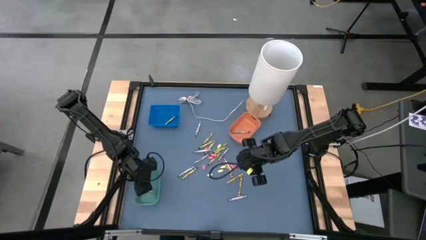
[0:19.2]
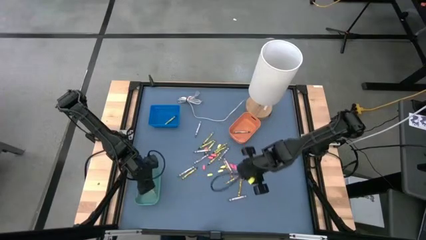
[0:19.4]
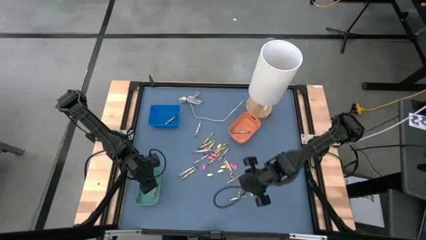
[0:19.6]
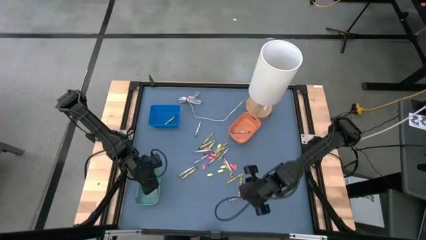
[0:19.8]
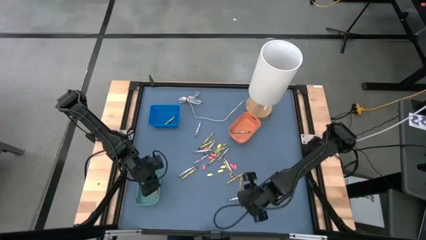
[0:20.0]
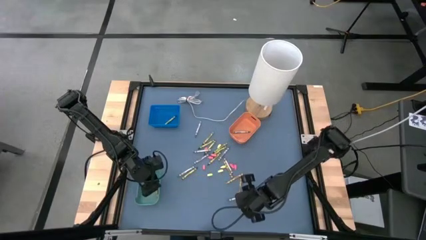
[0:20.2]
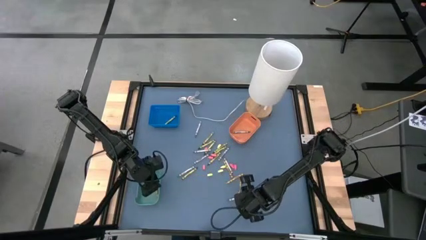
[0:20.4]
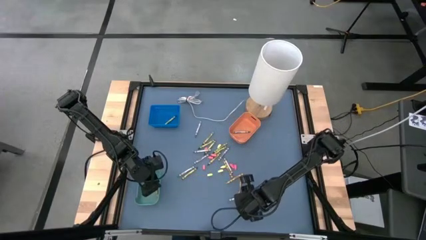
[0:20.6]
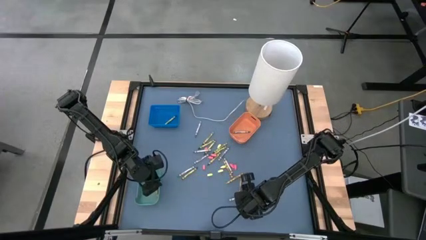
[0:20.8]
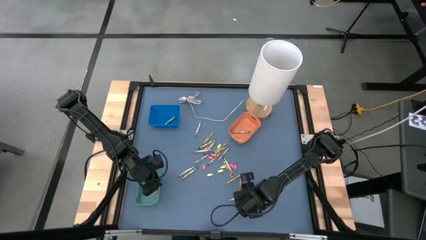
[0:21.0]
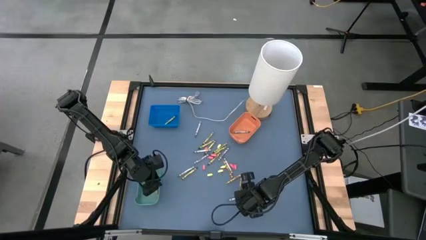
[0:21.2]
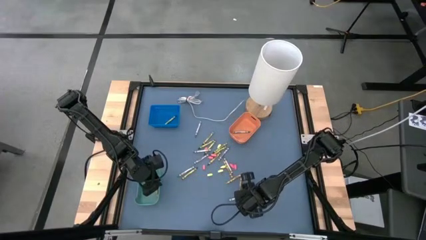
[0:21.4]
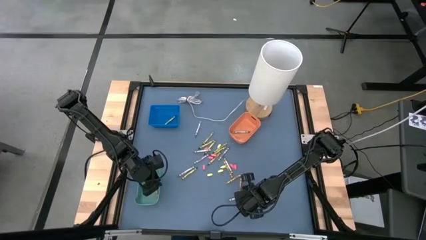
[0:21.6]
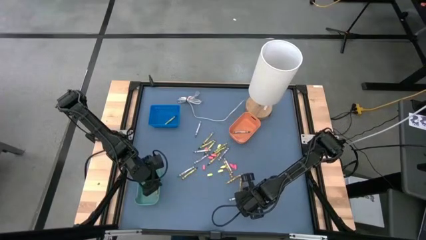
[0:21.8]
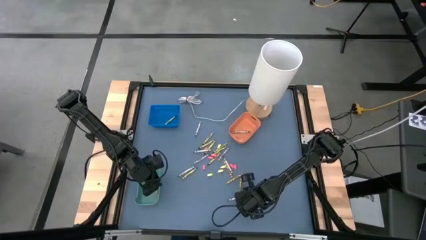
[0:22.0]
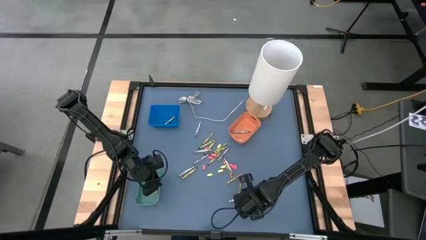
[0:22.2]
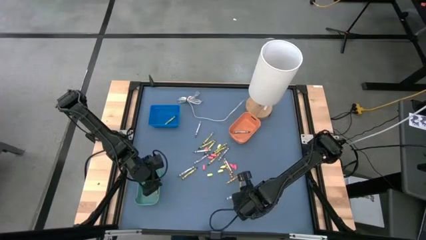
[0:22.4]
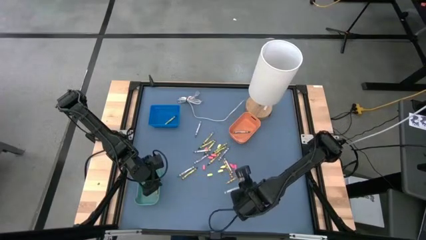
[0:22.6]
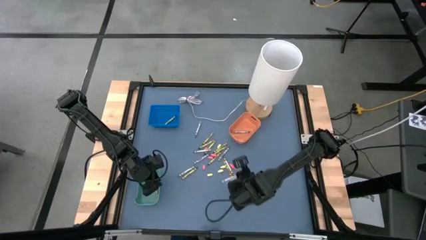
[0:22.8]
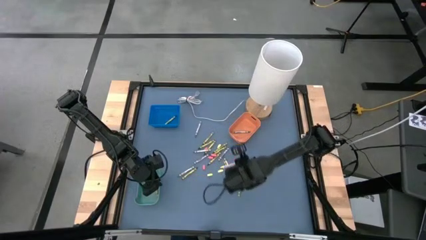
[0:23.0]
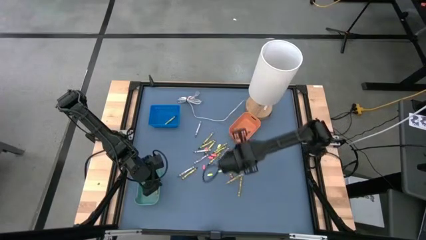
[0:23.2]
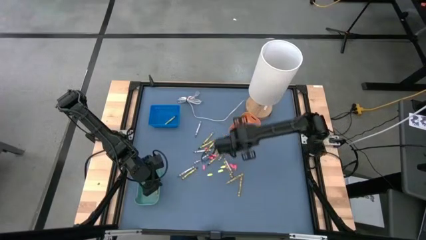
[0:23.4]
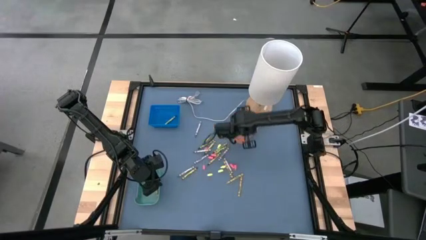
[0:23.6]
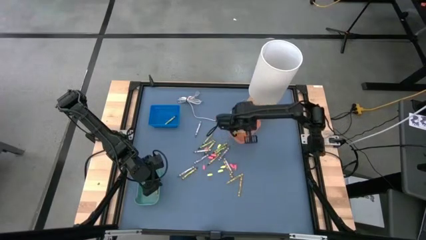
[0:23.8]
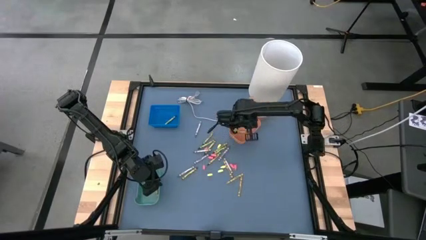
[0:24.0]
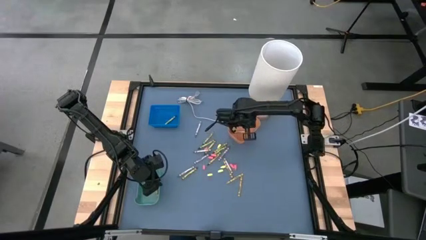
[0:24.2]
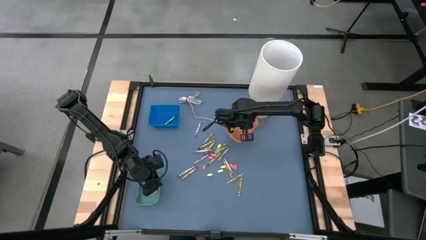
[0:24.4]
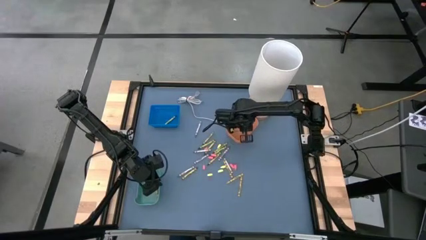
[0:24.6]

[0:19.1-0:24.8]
Task: Sort crayons
Put the gray crayon into the orange bin

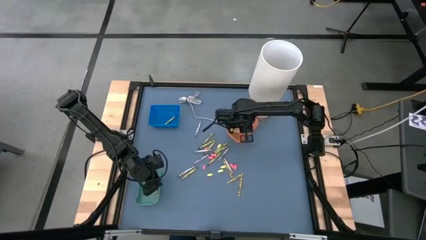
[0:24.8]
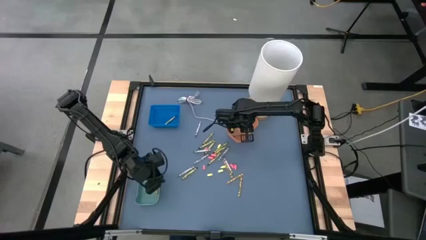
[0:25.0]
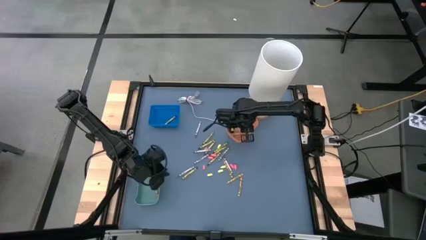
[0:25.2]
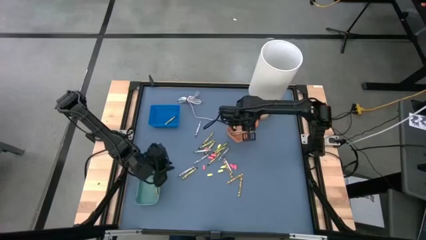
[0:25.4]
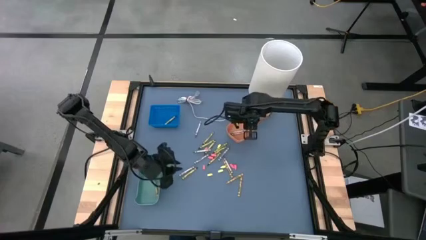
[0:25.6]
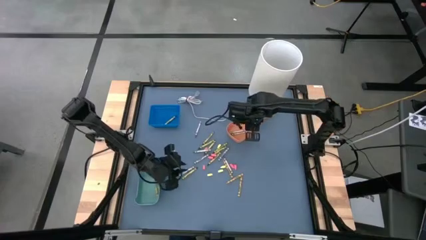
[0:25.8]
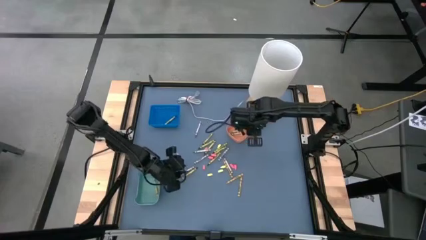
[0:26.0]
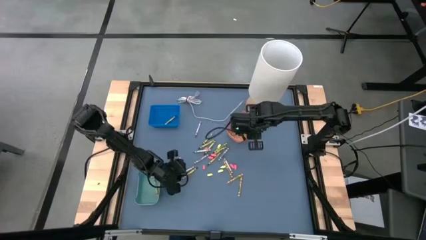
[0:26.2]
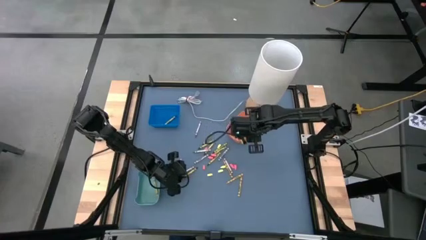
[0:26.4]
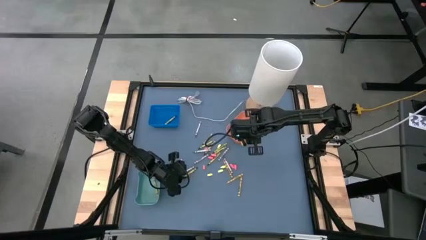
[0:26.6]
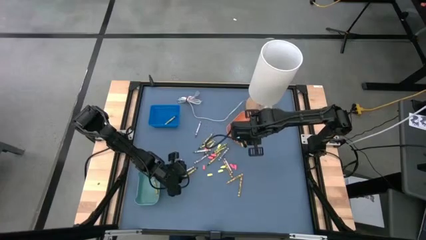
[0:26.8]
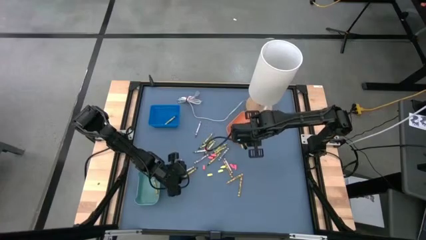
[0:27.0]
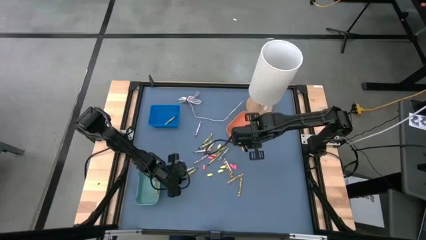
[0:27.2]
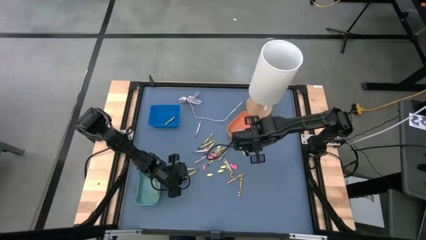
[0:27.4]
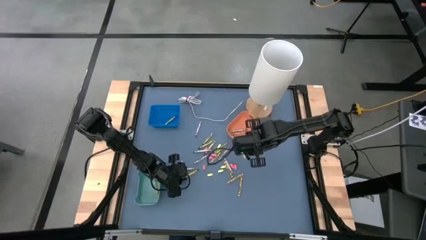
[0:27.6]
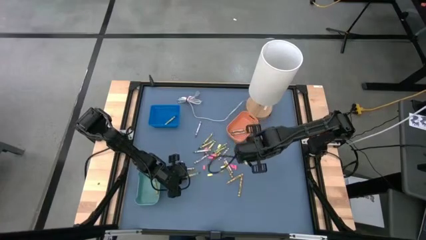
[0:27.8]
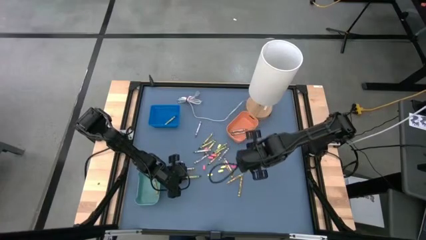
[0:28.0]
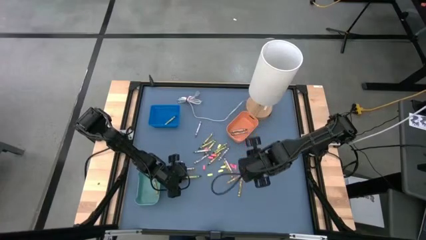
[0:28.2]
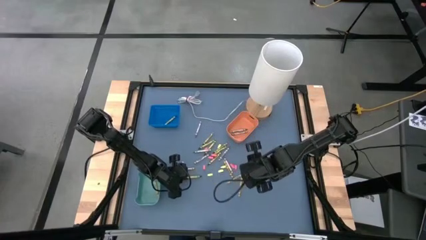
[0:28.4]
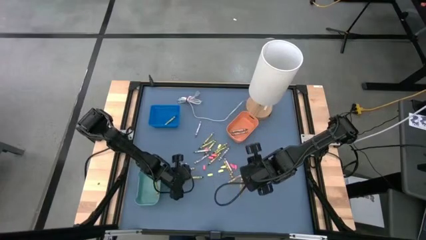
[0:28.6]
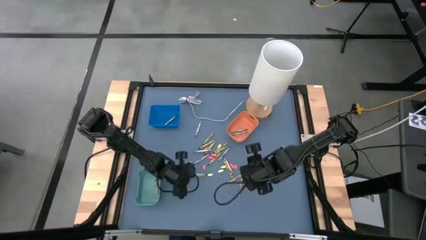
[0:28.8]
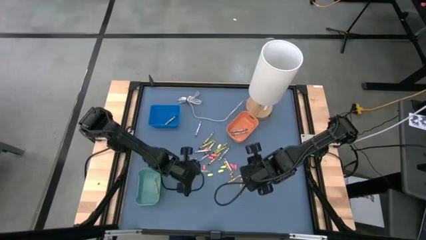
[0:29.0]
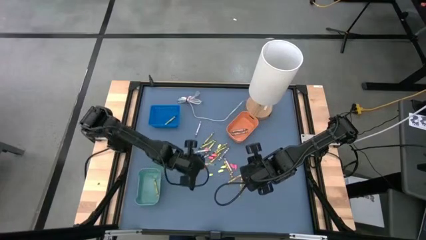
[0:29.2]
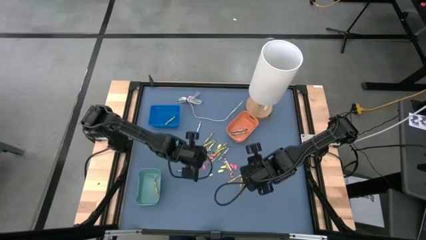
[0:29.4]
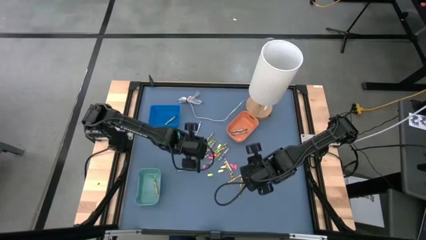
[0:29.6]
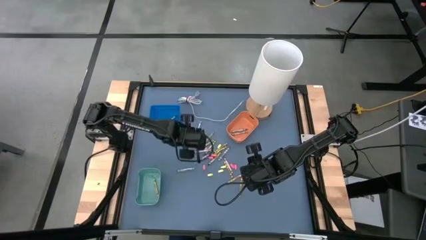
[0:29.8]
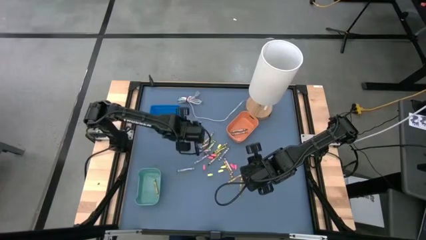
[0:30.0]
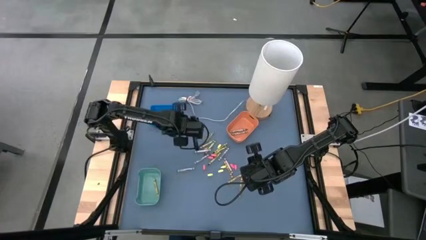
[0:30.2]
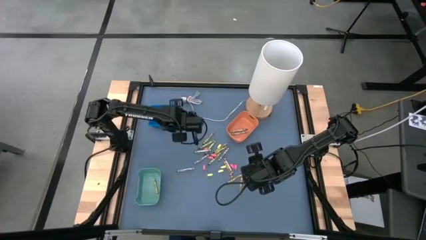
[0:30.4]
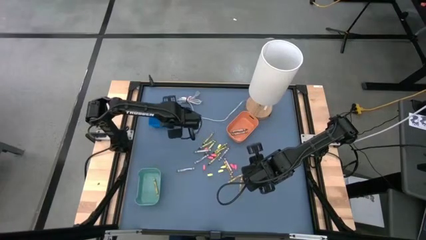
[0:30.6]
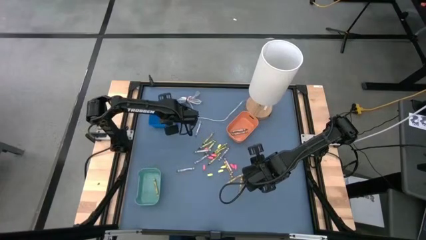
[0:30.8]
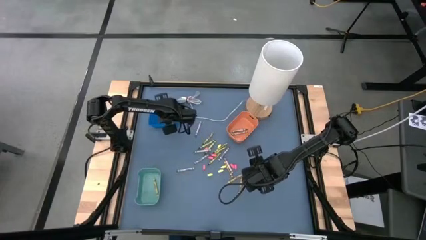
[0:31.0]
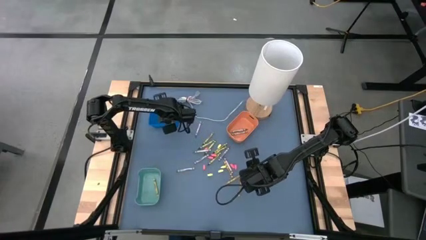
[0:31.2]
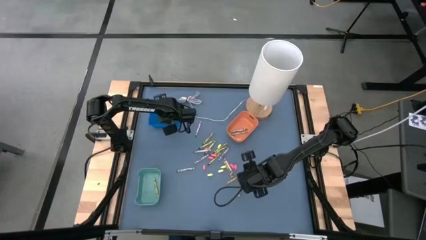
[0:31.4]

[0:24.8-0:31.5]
Put the green crayon into the blue bin

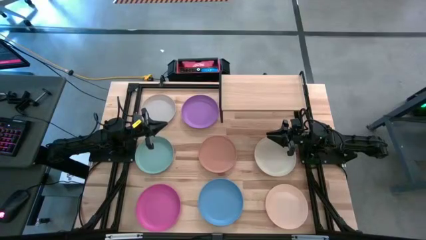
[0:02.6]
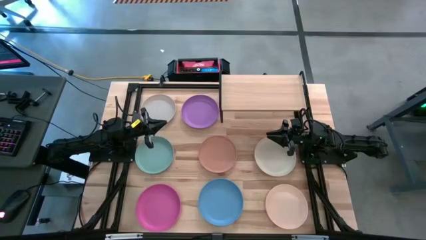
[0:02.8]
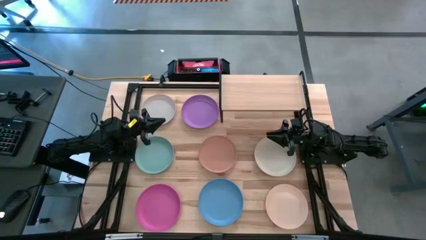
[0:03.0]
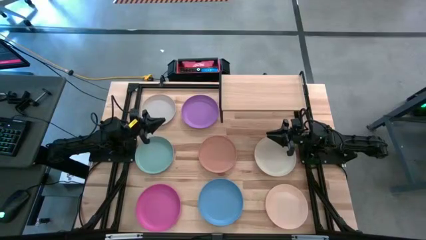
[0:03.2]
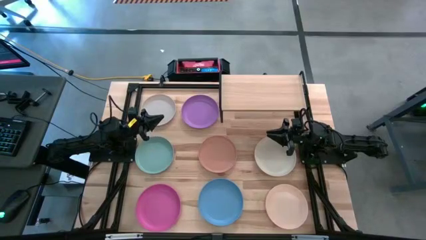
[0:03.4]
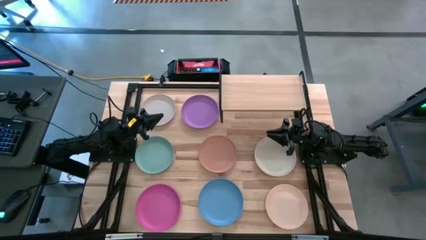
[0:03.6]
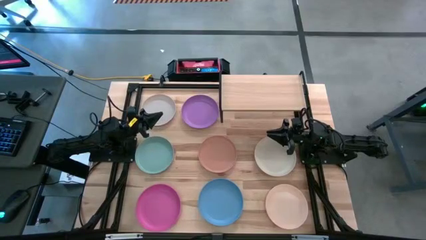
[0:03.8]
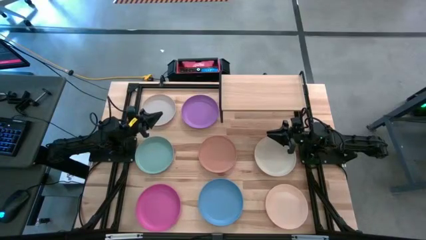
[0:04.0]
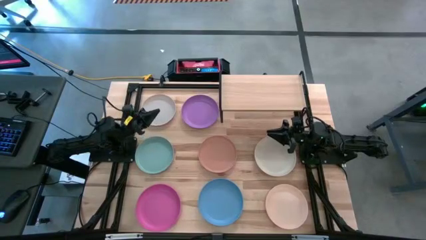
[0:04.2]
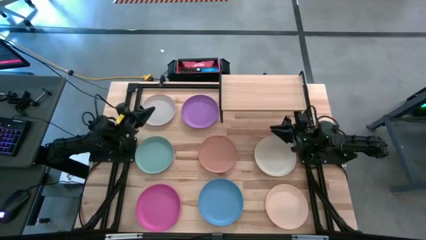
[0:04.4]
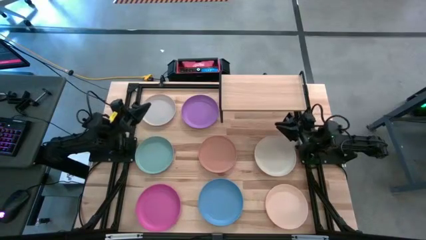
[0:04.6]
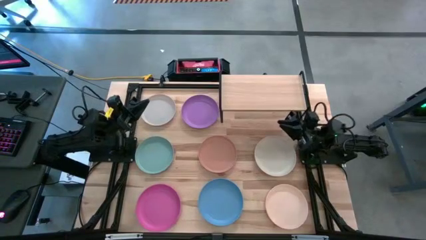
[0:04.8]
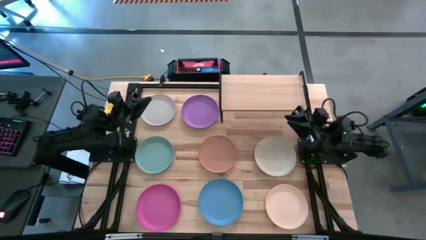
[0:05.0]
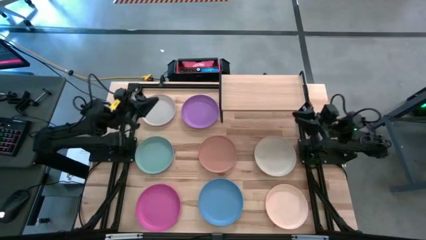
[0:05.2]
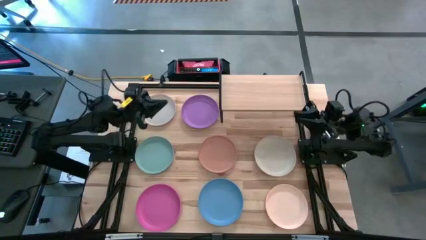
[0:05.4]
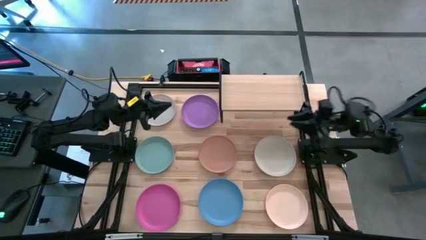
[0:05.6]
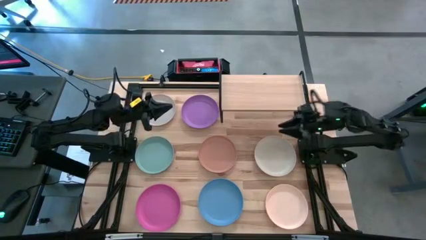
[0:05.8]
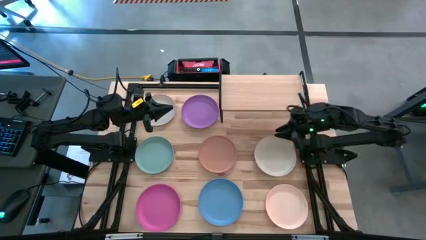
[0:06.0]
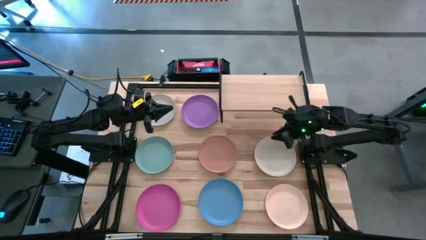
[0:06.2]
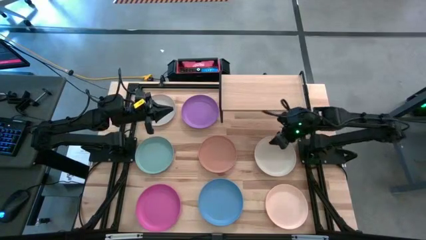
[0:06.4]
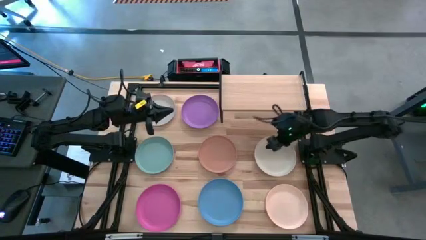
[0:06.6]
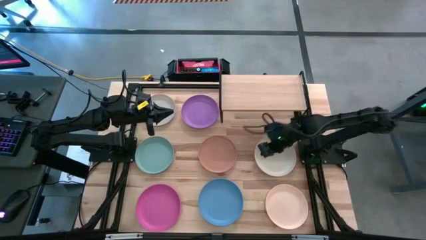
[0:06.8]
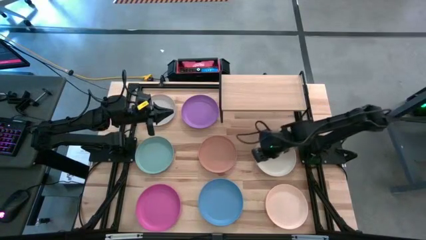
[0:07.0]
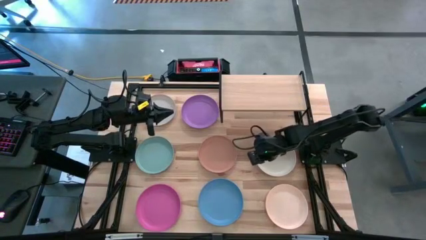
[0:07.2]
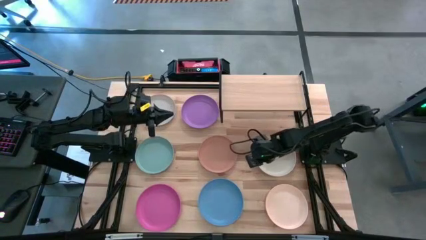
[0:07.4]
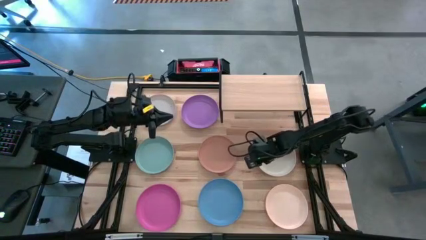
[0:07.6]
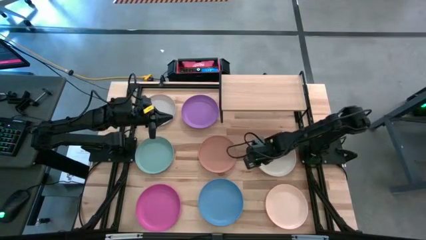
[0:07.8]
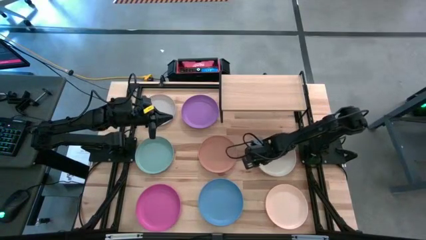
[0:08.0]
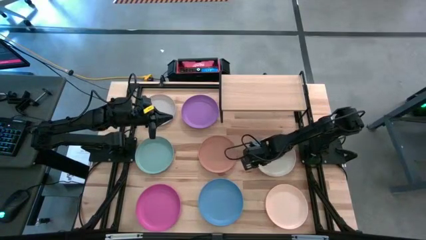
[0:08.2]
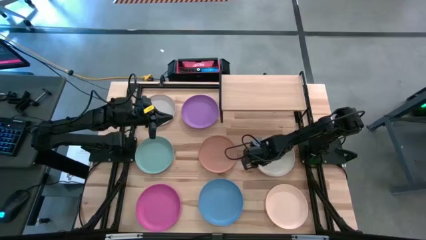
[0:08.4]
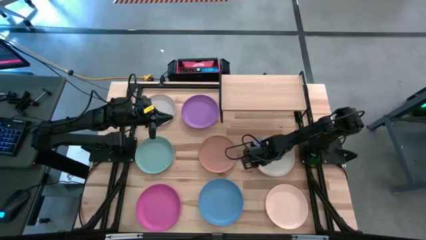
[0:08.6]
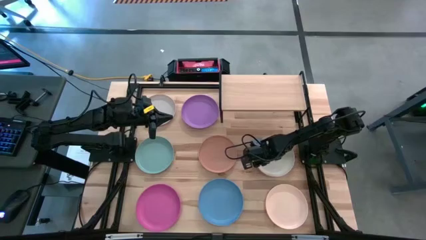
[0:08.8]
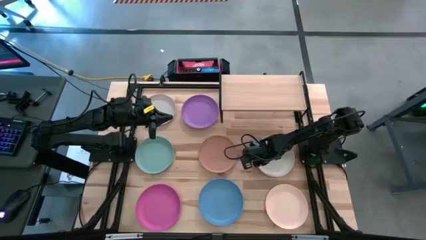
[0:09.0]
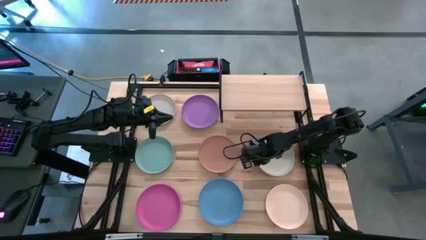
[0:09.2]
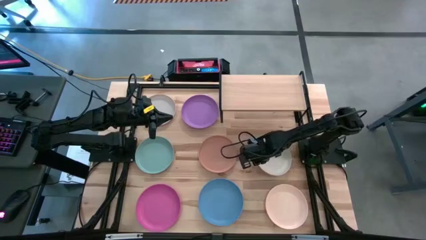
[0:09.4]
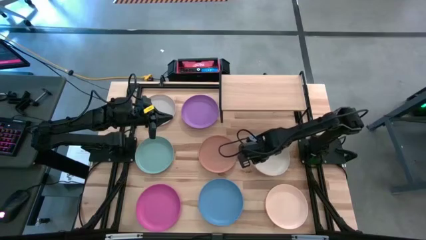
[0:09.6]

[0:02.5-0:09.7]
Task: Place and stack plates onto a shelf
Put the bottom white plate on the shelf
